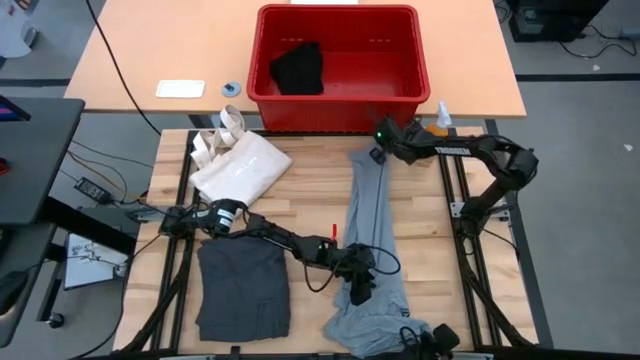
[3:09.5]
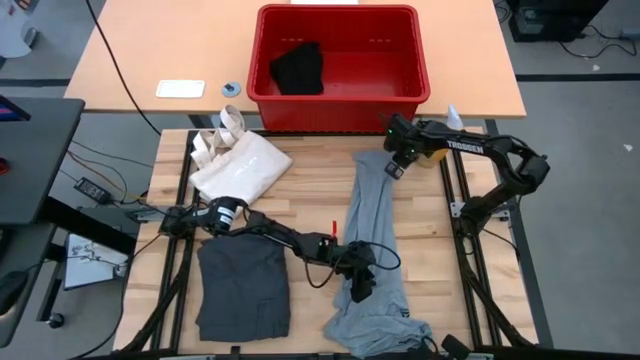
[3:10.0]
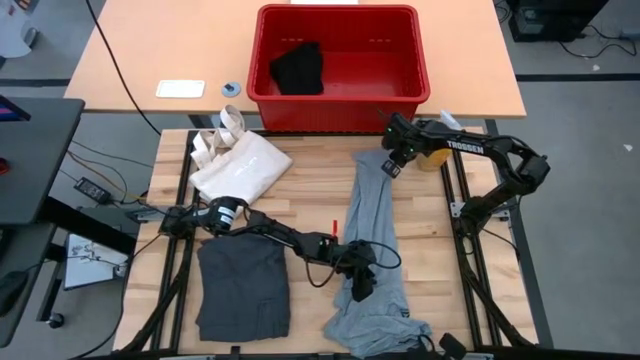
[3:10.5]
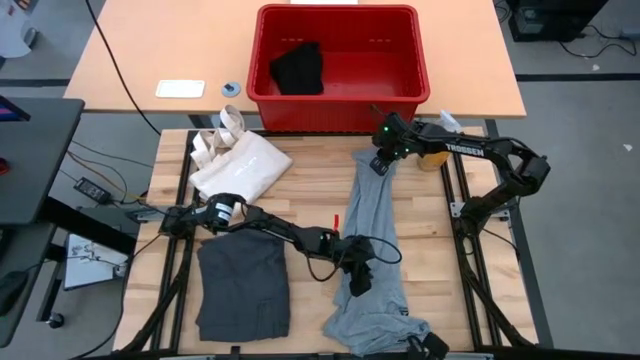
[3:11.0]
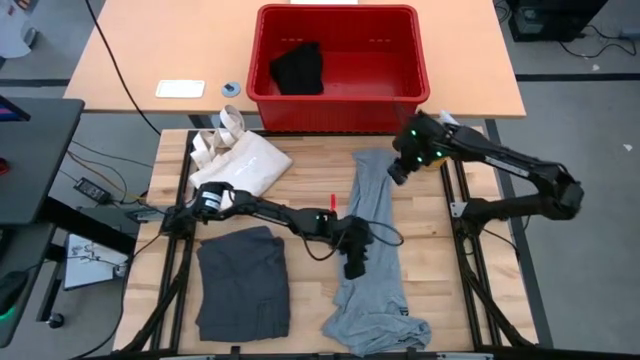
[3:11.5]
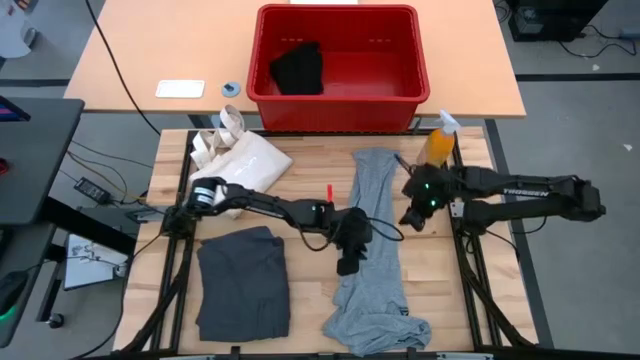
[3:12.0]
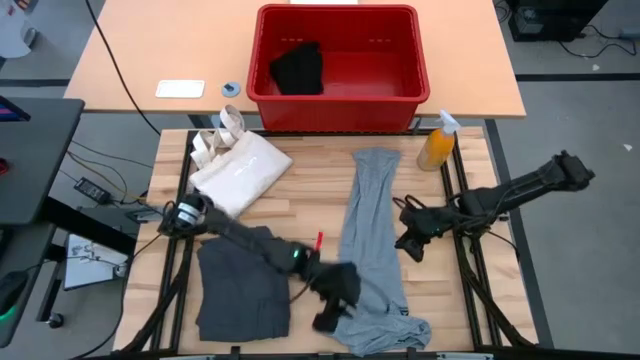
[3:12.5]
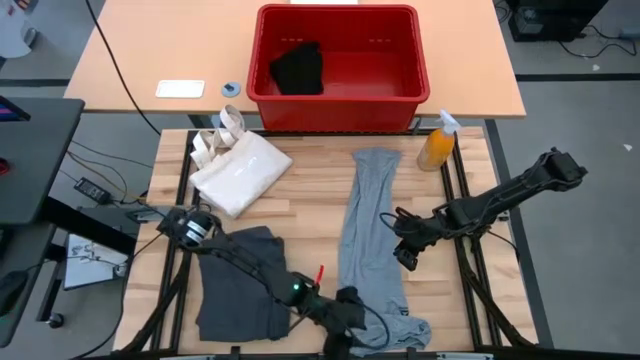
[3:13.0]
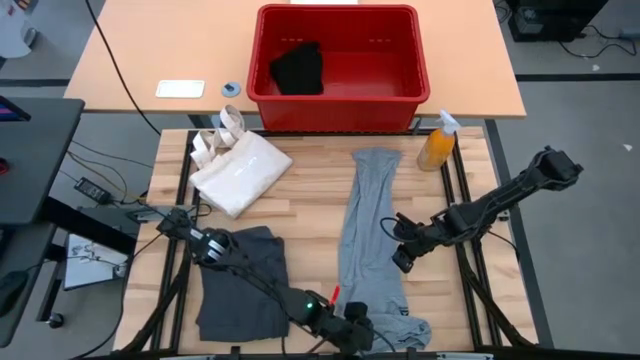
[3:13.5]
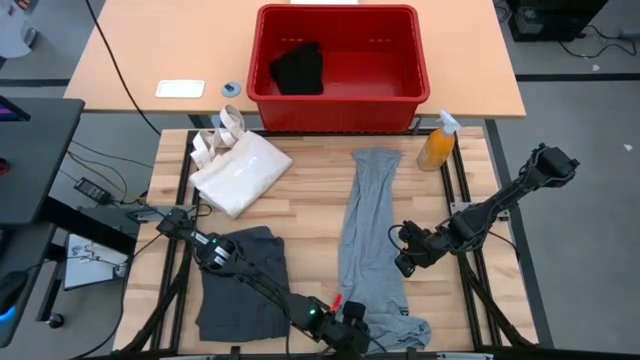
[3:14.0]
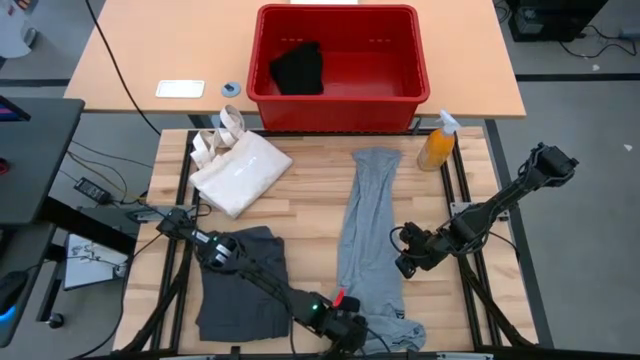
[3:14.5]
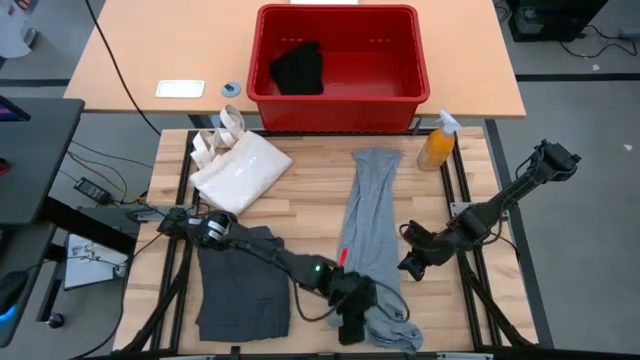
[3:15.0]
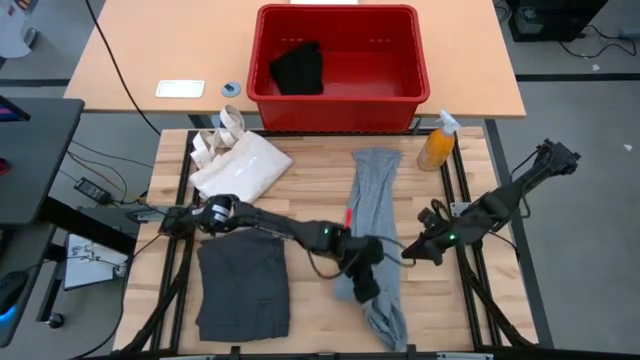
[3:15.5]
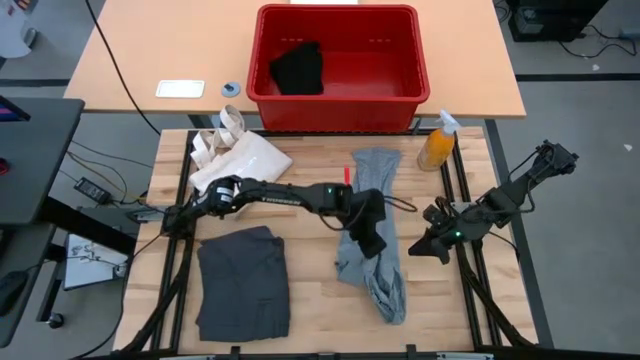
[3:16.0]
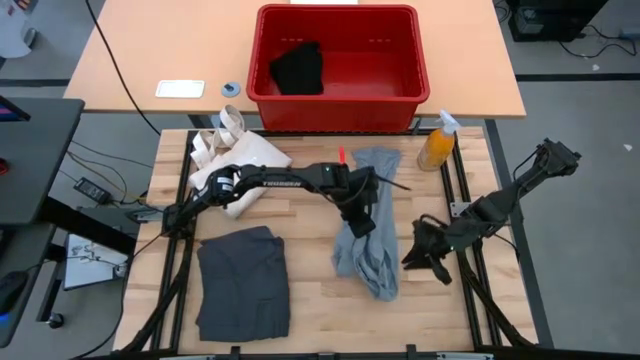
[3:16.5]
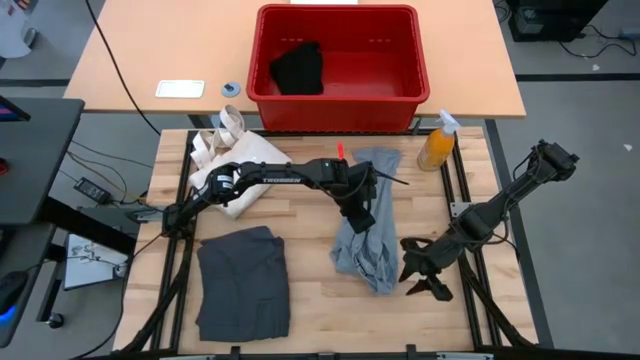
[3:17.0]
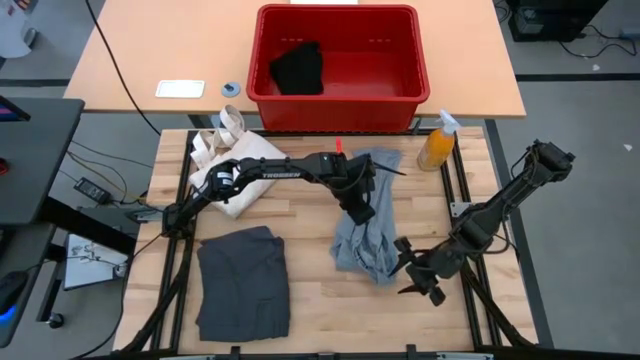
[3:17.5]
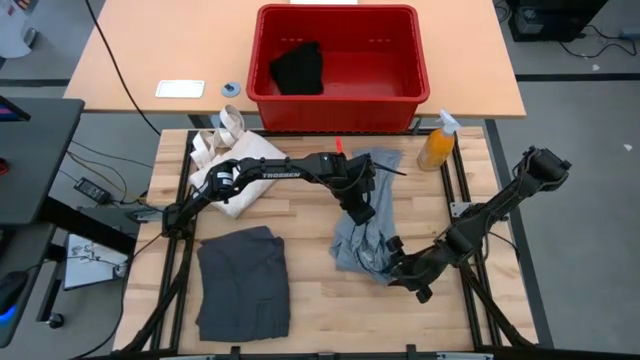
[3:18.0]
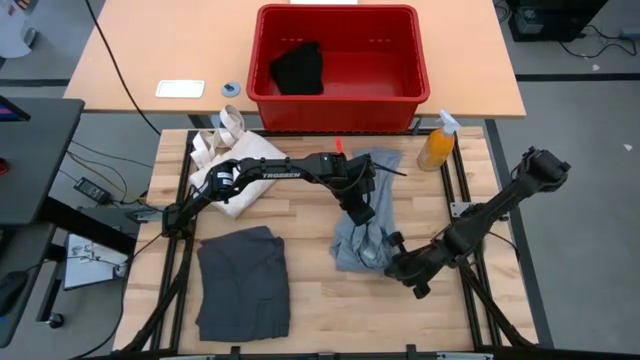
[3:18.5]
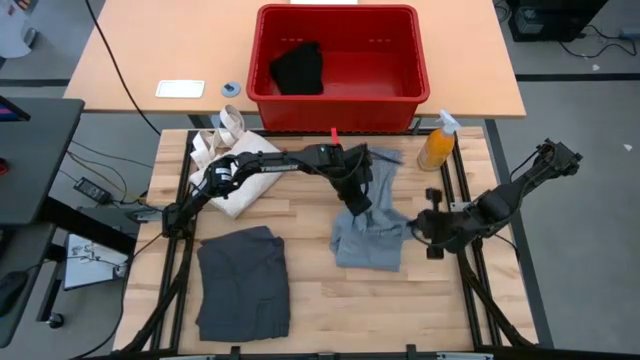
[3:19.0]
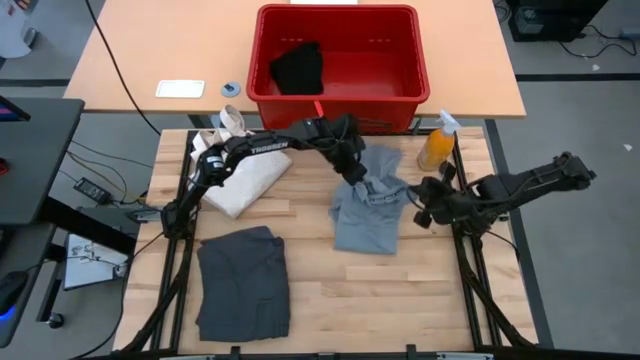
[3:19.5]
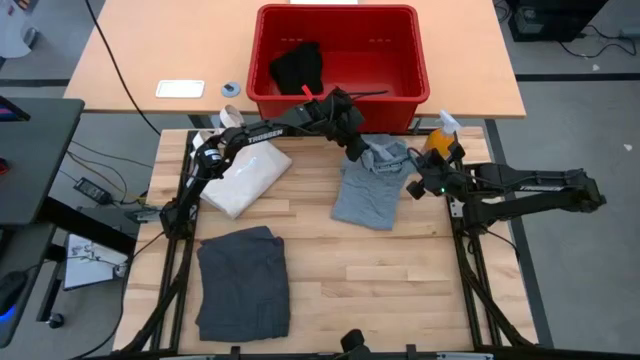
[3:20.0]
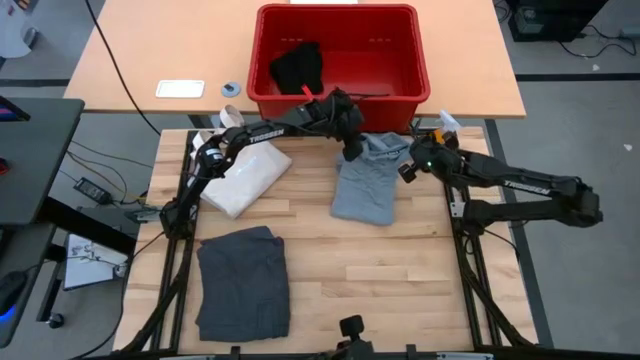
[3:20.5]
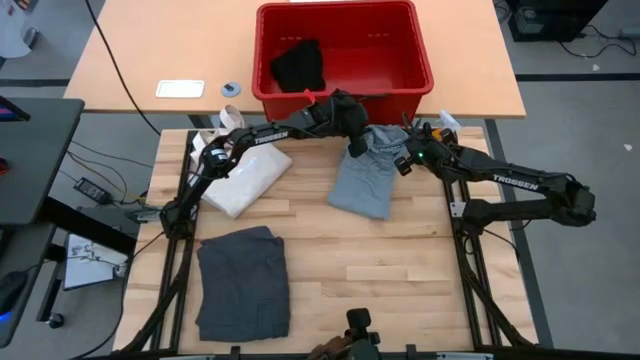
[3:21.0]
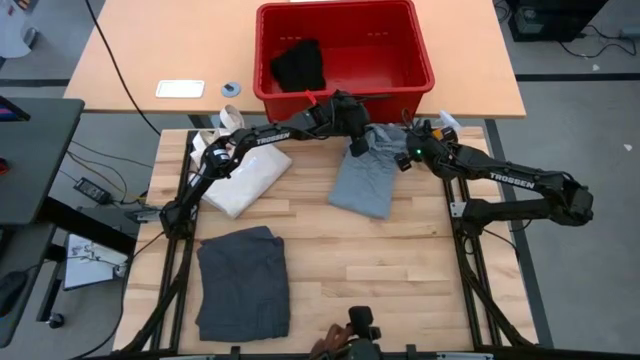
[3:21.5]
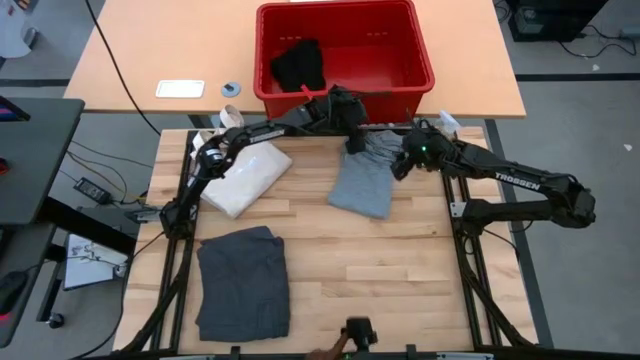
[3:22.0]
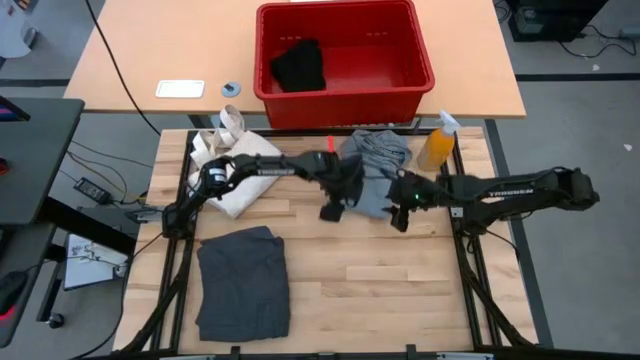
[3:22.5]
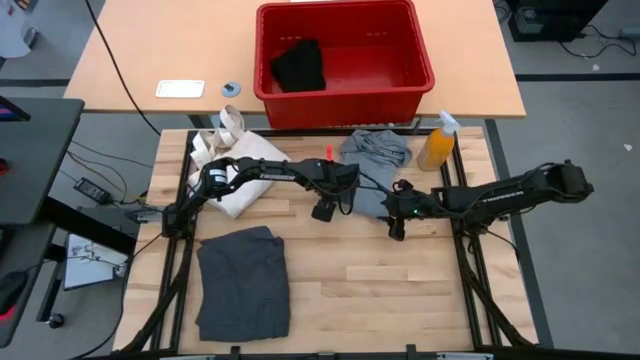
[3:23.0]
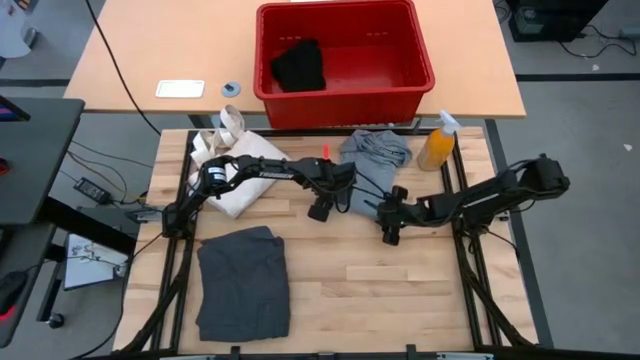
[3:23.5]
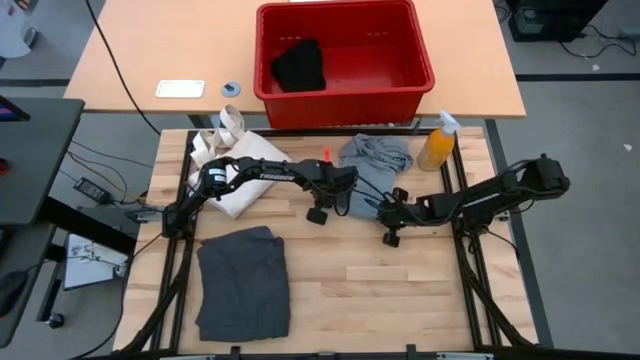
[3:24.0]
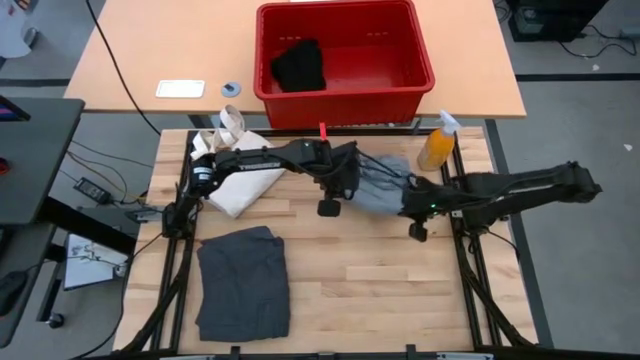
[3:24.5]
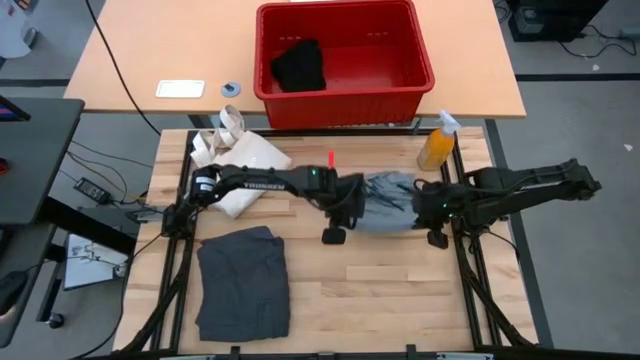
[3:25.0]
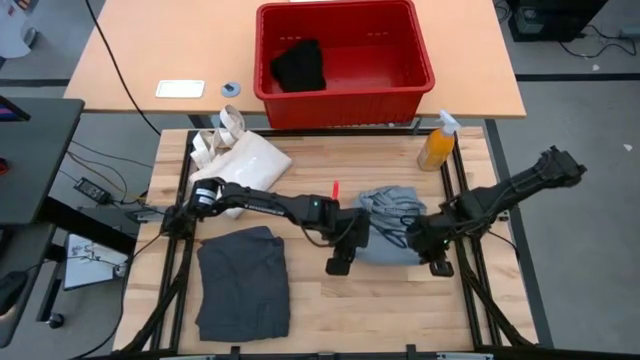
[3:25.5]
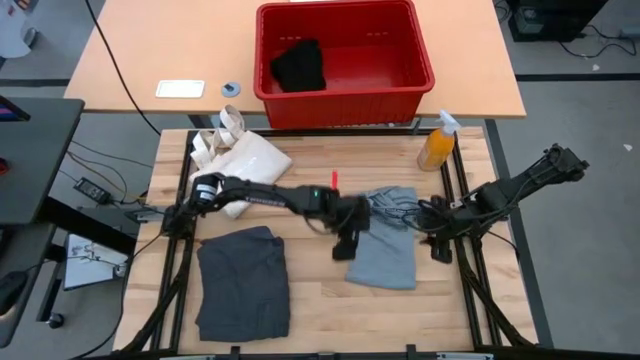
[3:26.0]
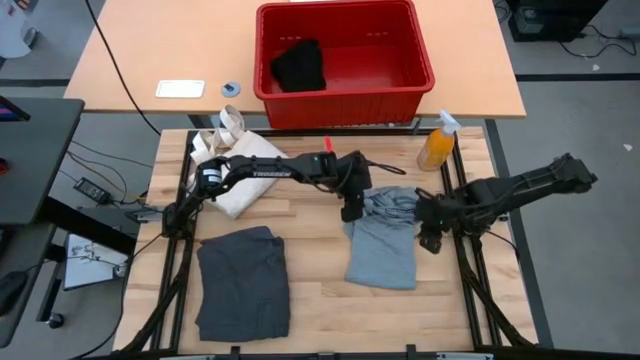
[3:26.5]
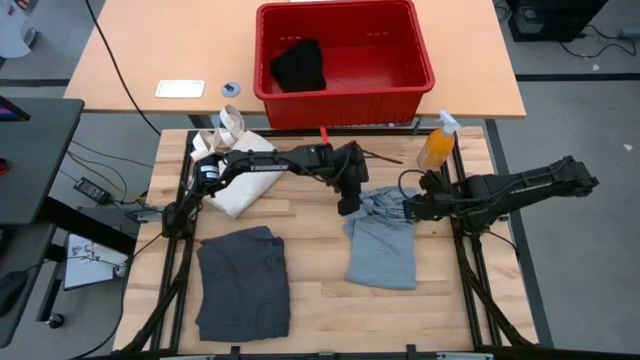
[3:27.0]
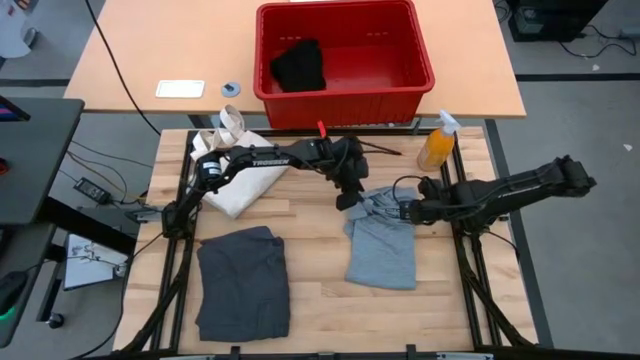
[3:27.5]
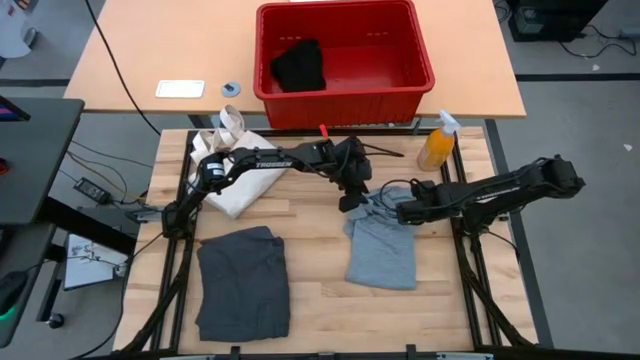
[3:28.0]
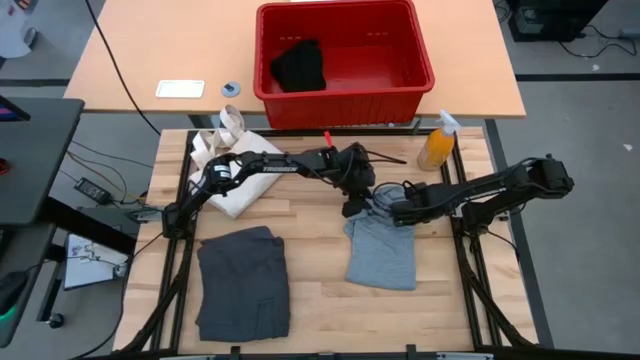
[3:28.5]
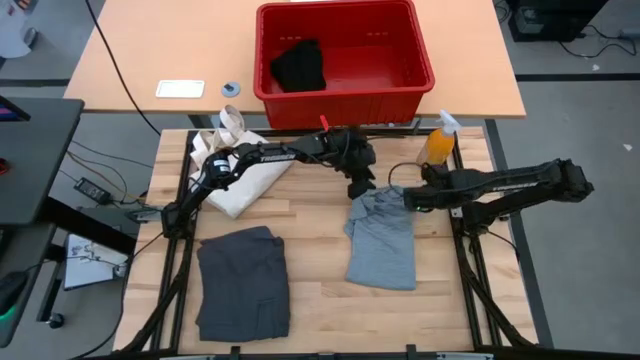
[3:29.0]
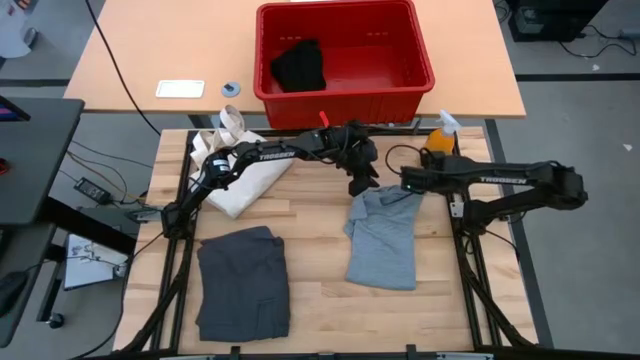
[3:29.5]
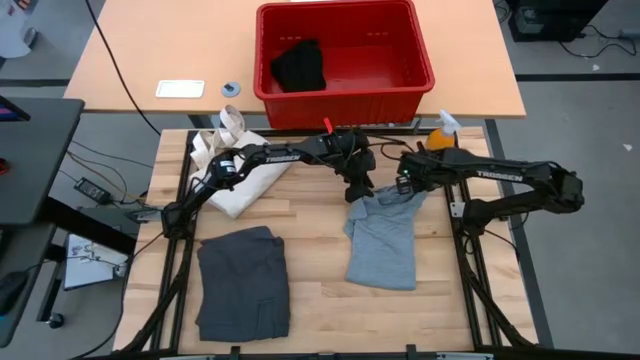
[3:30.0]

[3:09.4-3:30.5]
Task: Fold Laundry from Bin
Fold the light gray t-shirt
